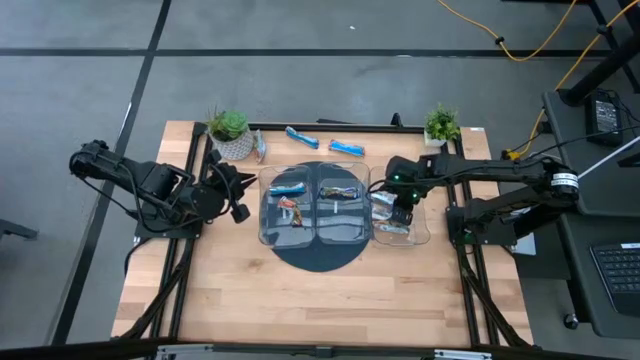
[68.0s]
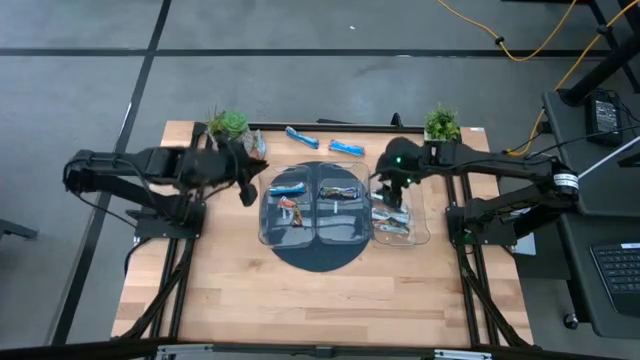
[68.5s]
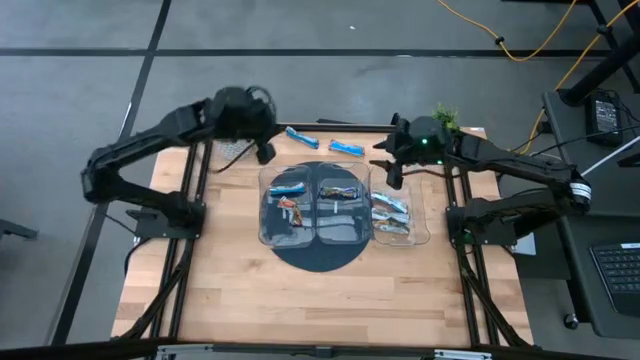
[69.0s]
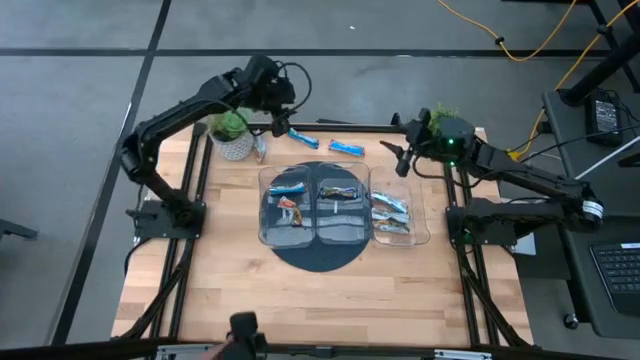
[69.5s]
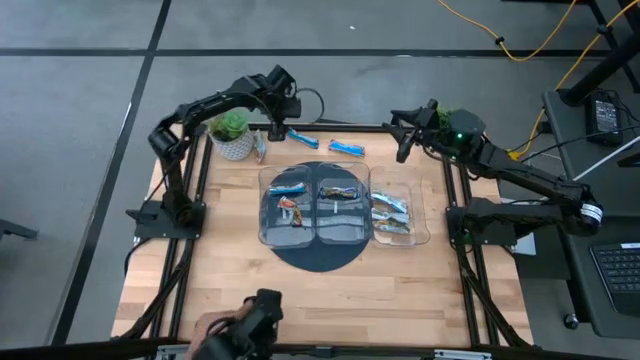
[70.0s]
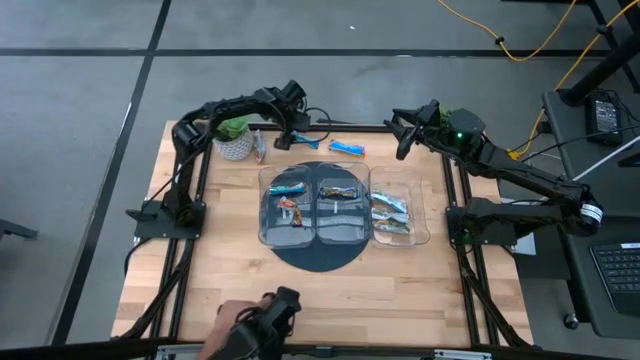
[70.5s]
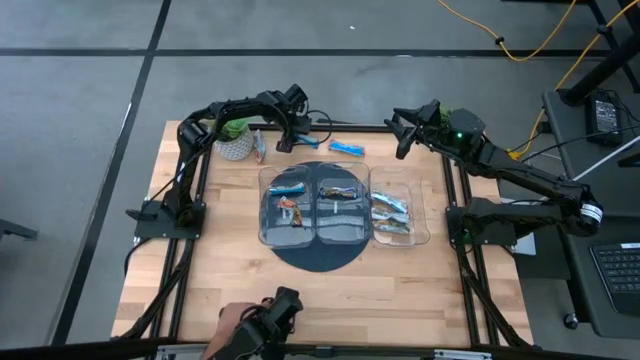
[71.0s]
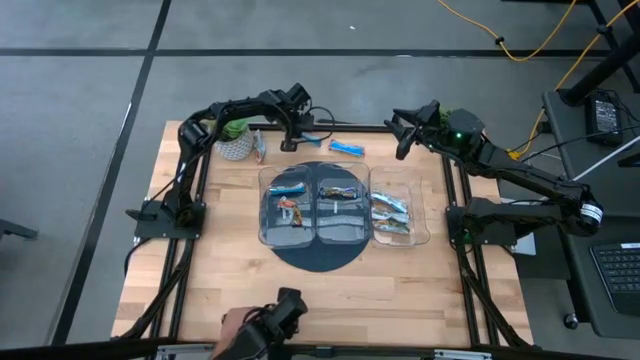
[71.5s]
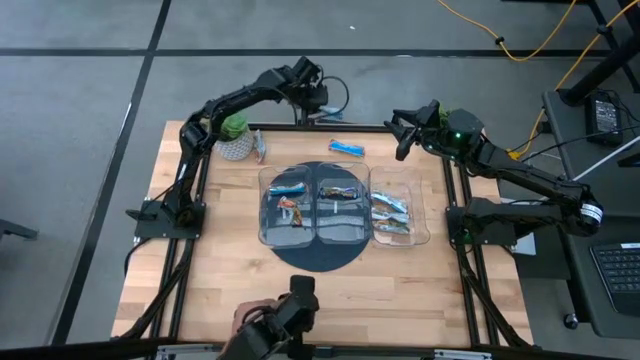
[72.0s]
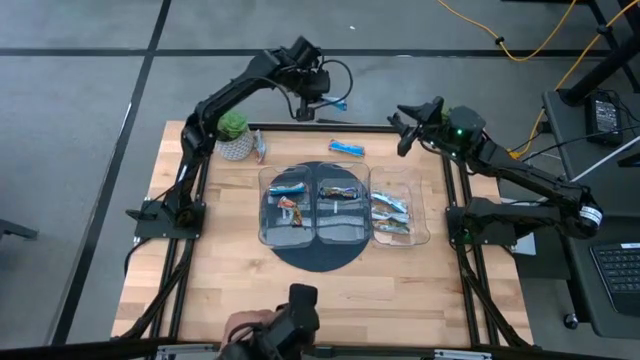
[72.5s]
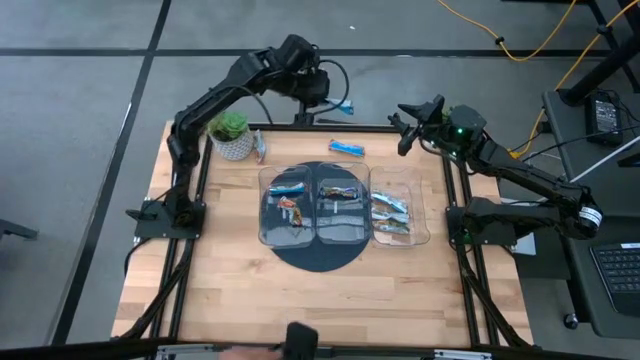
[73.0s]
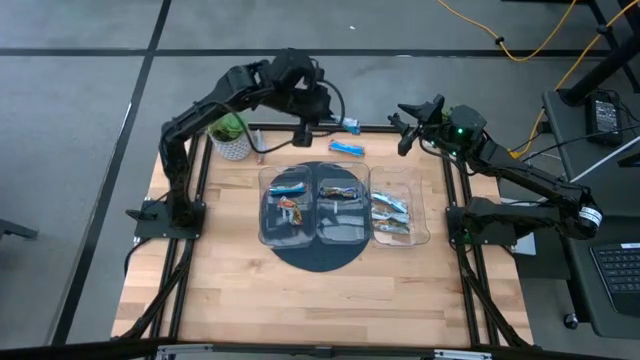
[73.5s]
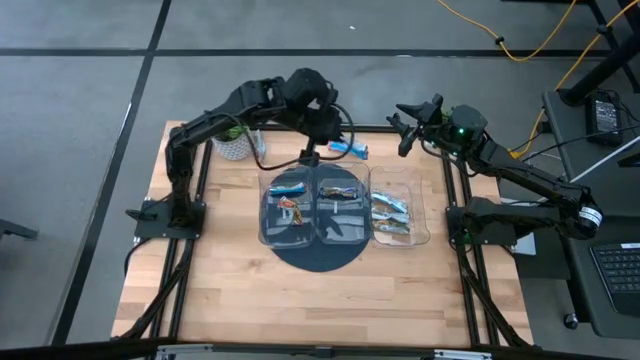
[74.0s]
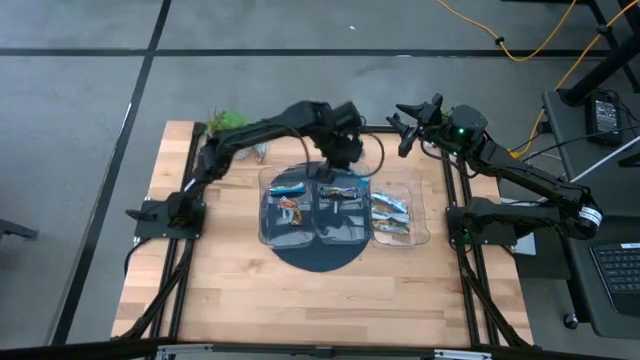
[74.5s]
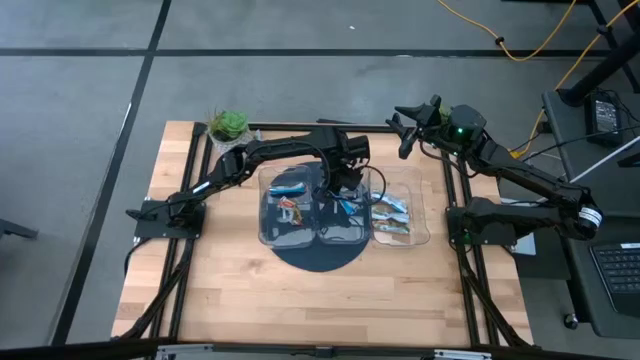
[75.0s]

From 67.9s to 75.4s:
Task: Pick and place Granola Bars by type
Put the blue granola bar into the center transparent bin

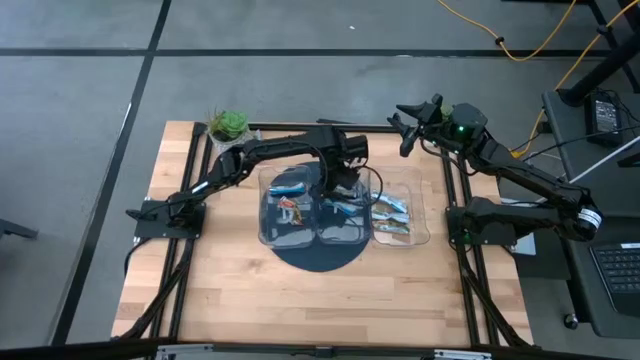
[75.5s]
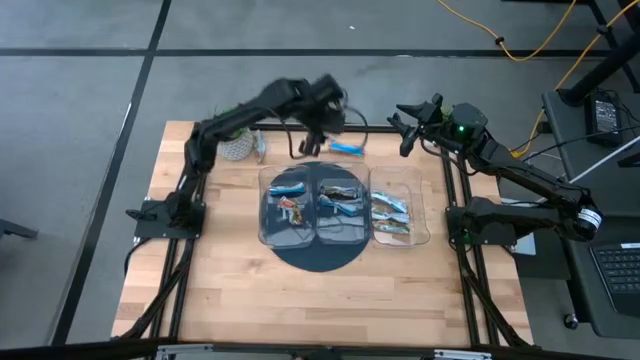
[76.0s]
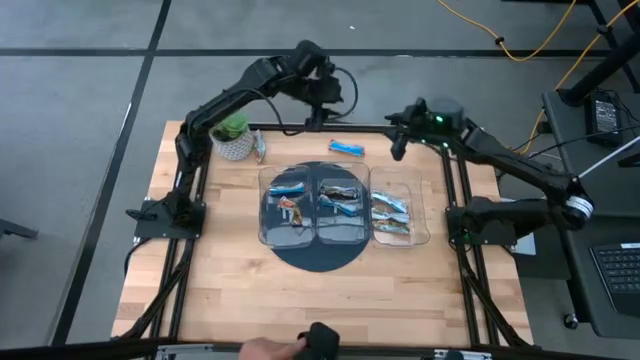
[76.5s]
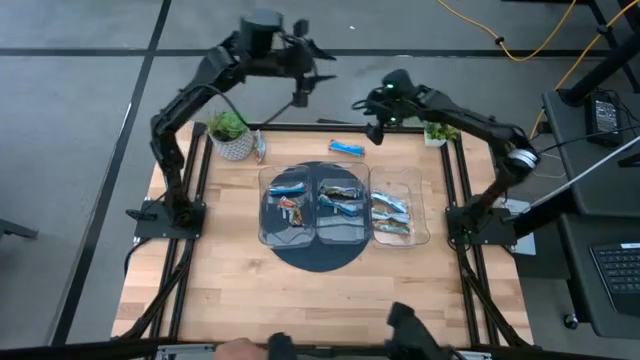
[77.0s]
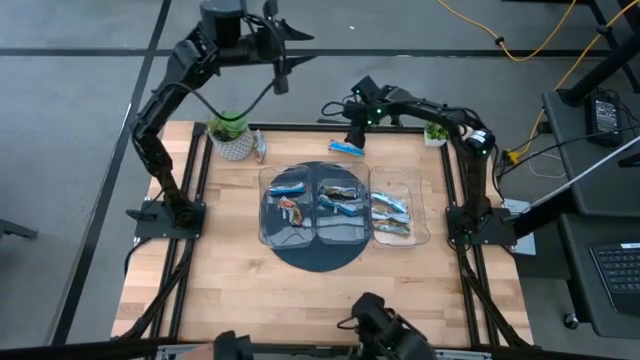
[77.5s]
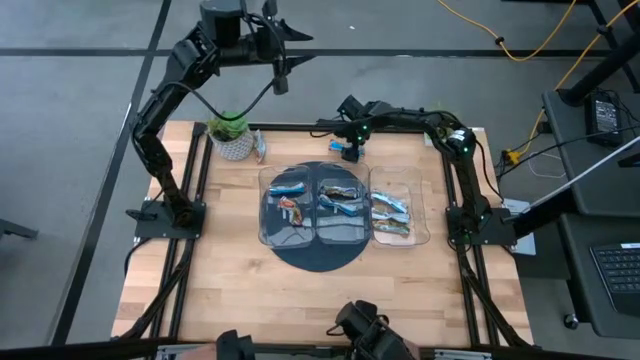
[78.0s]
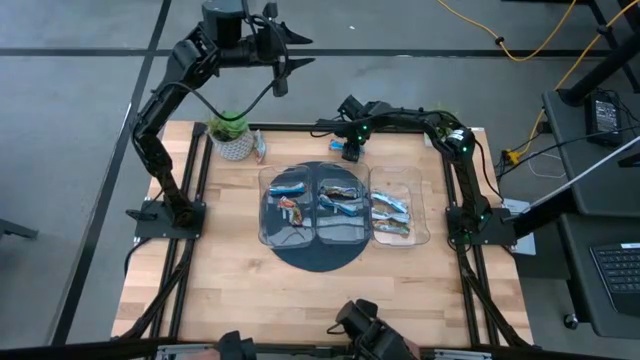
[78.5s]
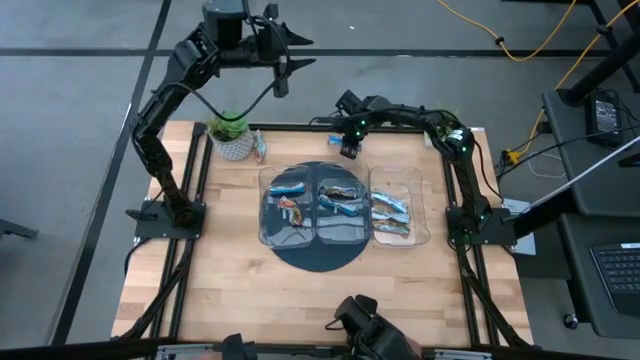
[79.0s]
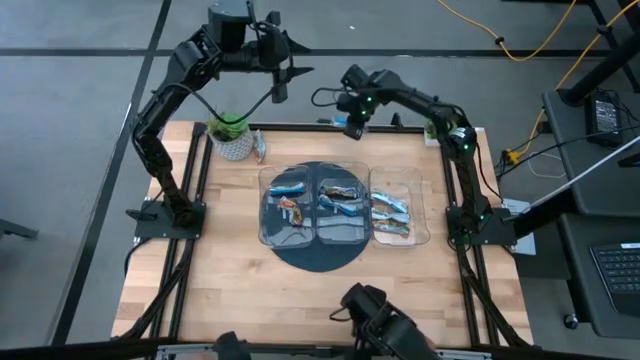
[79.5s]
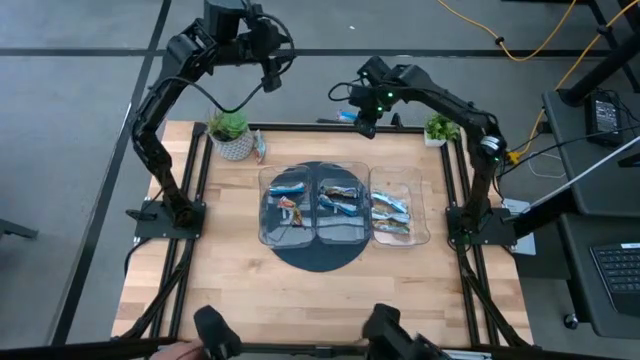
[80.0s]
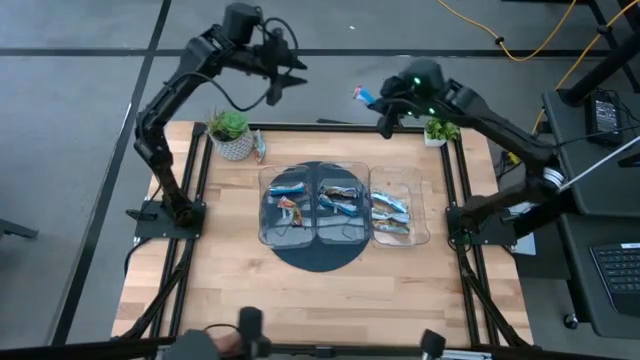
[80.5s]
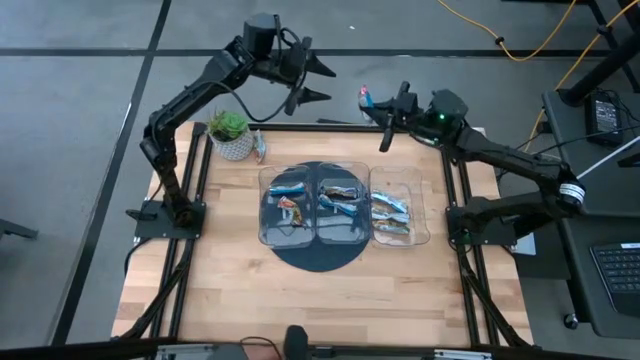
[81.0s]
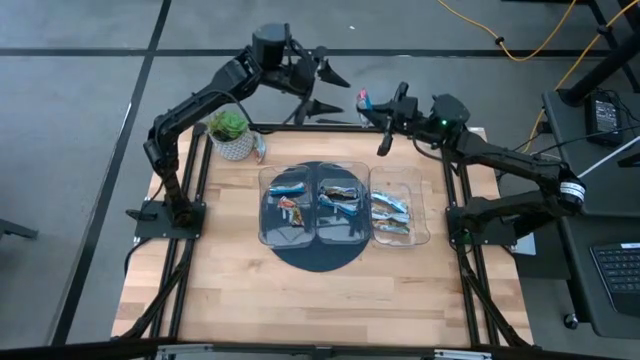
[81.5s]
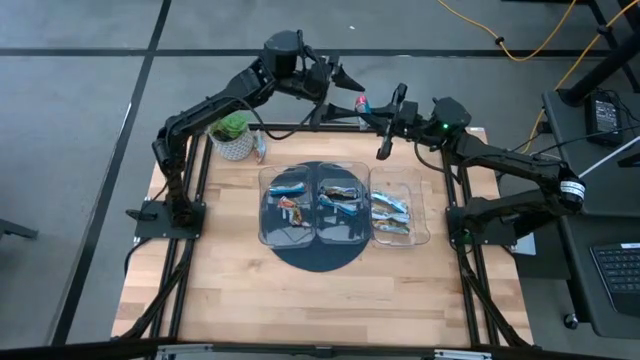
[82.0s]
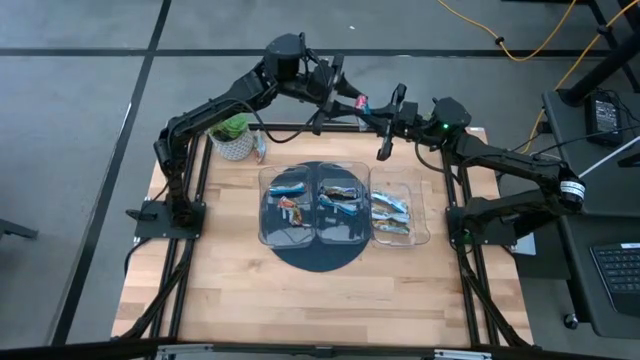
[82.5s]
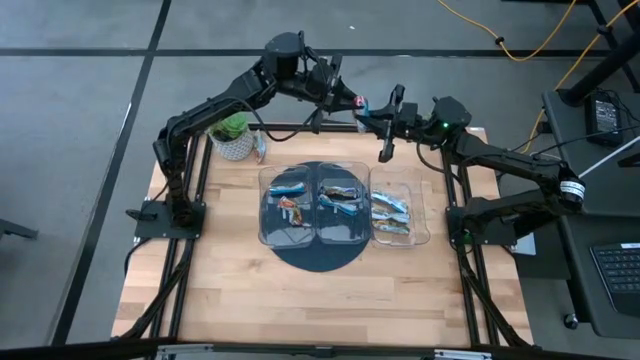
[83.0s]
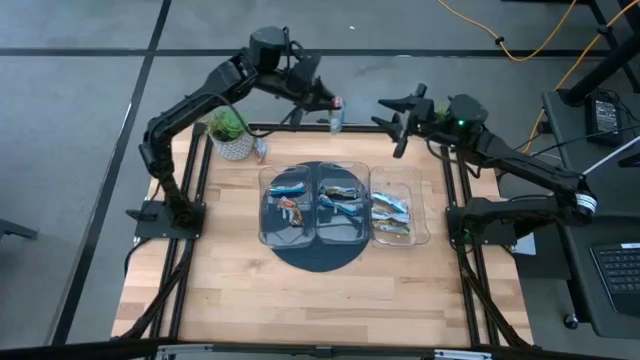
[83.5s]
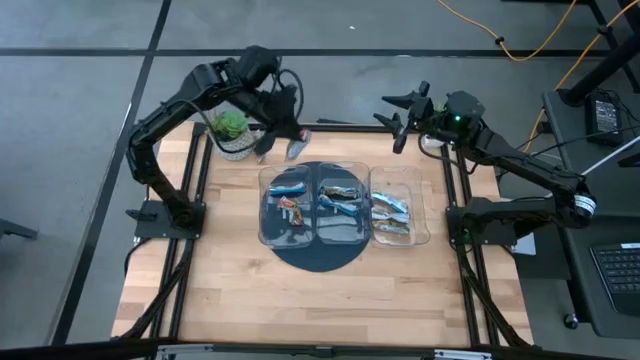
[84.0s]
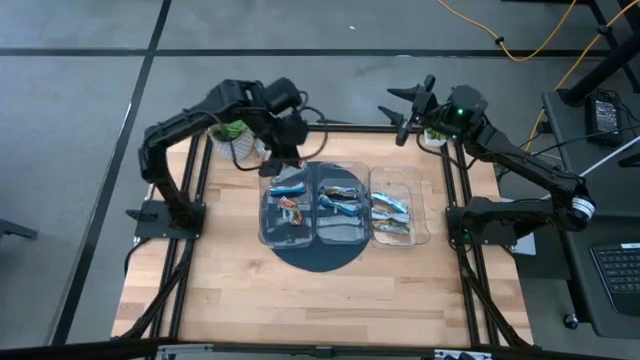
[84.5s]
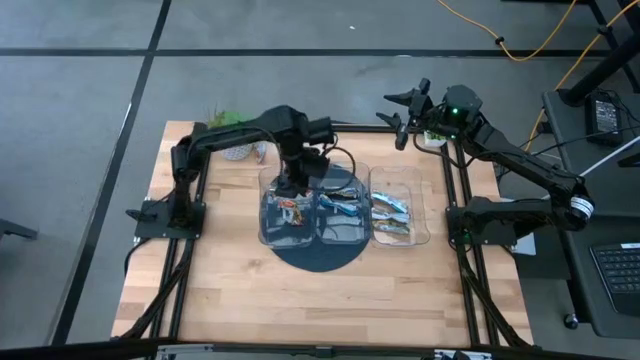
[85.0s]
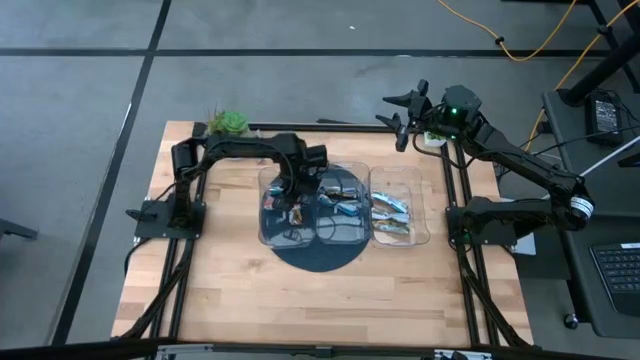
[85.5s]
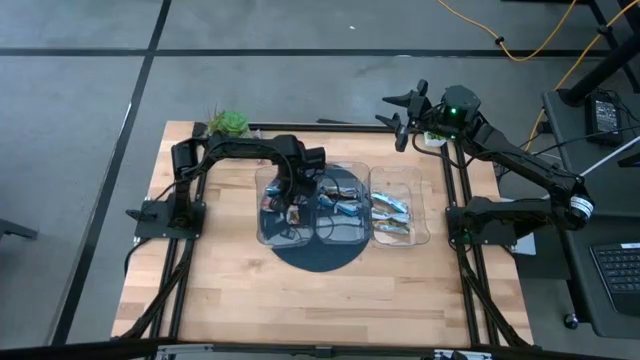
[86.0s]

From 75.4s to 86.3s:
Put the red granola bar into the left transparent bin

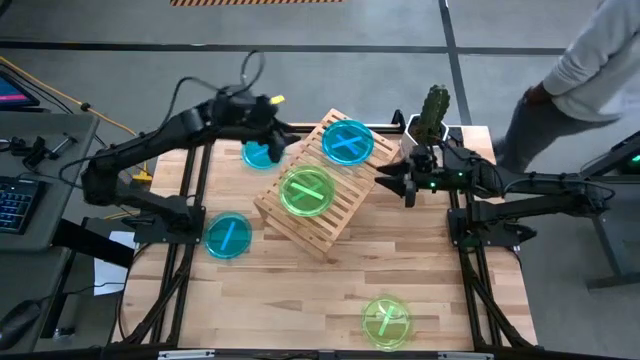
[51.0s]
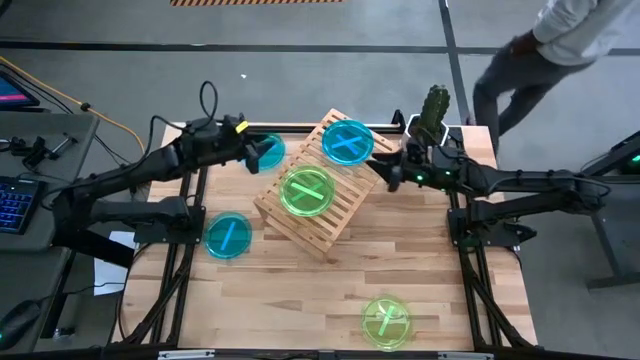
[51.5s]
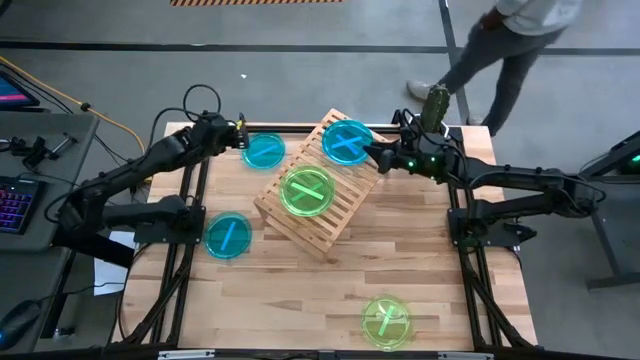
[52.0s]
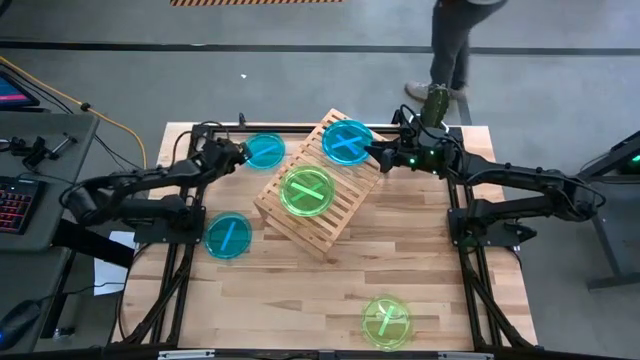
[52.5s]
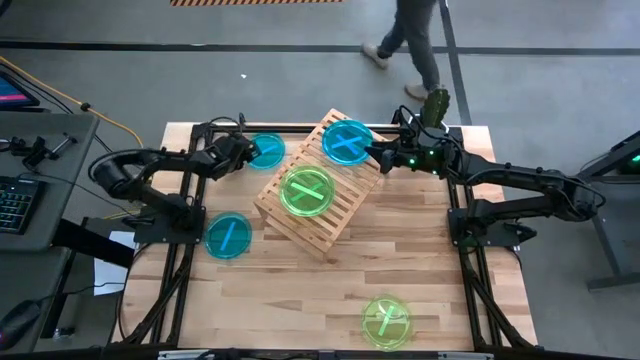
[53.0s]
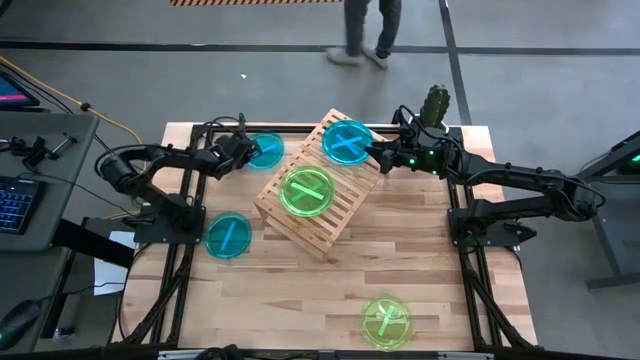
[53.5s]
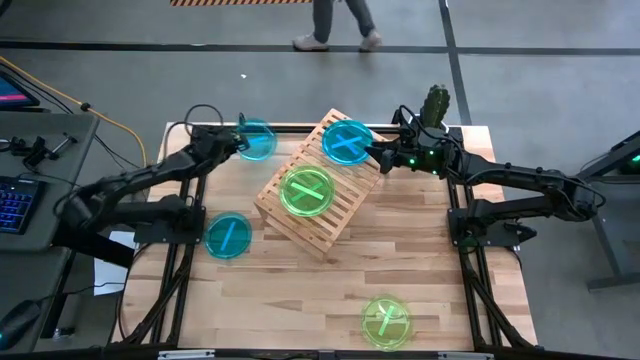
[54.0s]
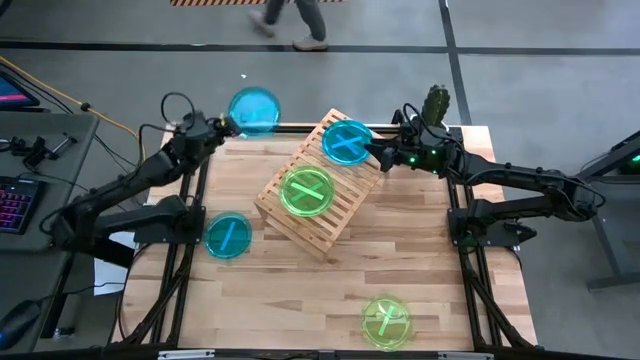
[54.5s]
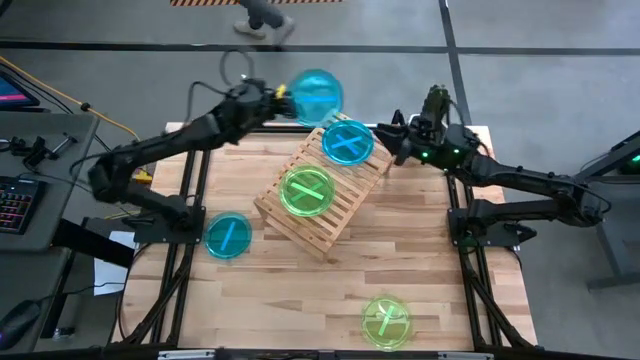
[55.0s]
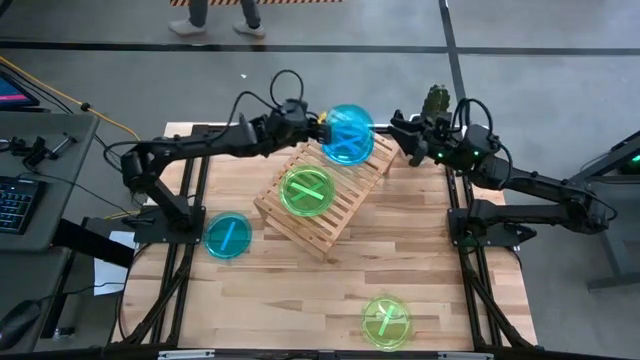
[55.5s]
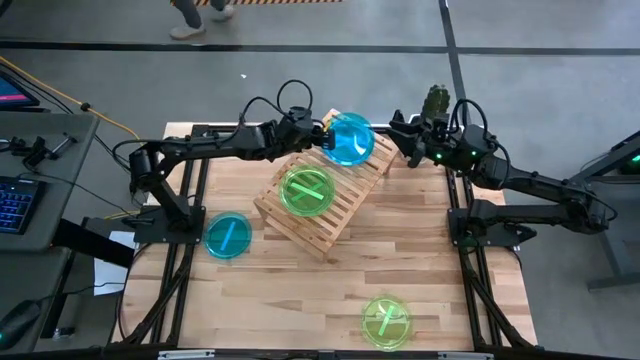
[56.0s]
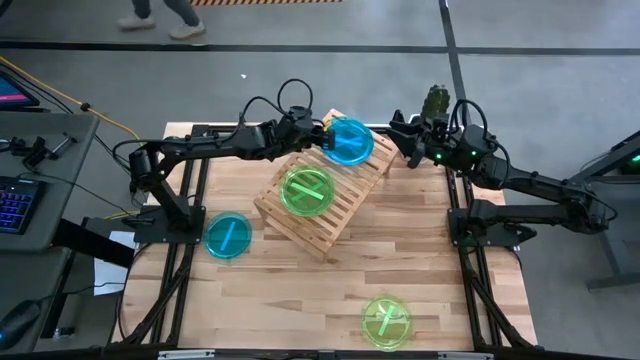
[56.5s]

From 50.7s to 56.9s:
Task: Place and stack plates onto a shelf
Stack the blue plate on top of the blue plate on the shelf
